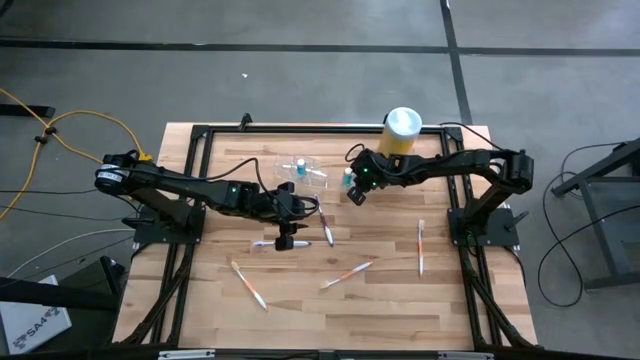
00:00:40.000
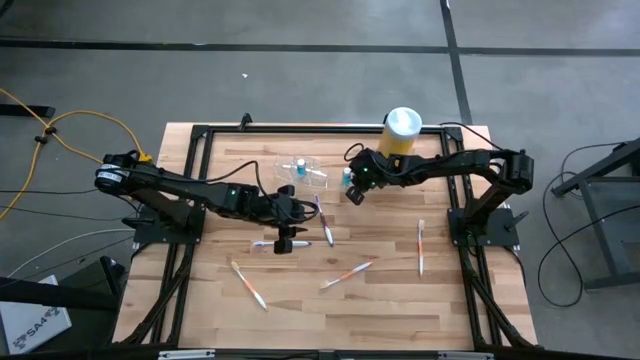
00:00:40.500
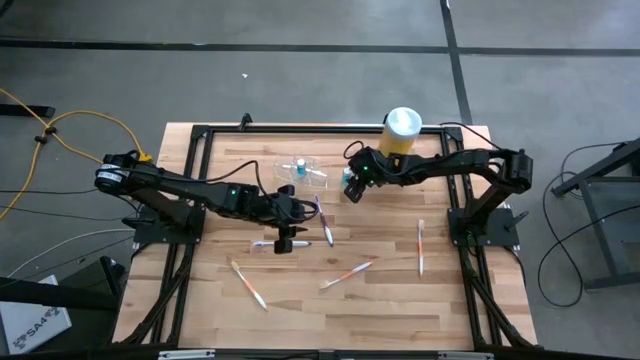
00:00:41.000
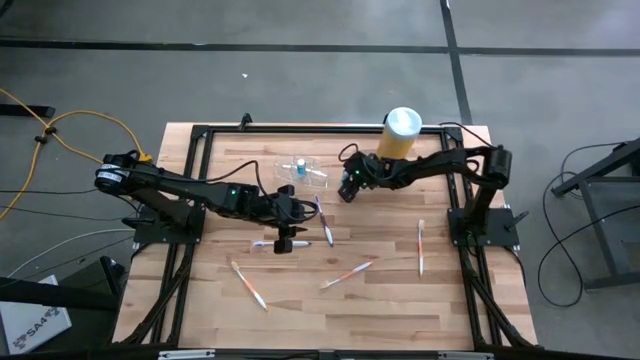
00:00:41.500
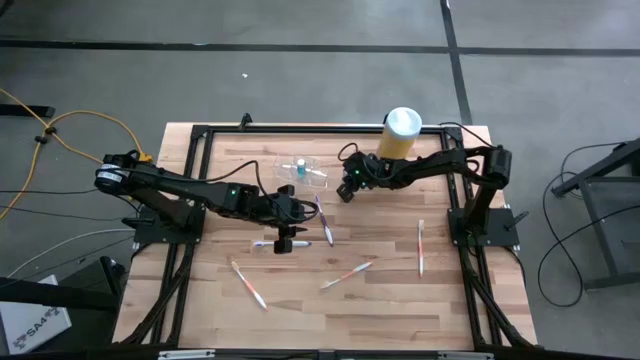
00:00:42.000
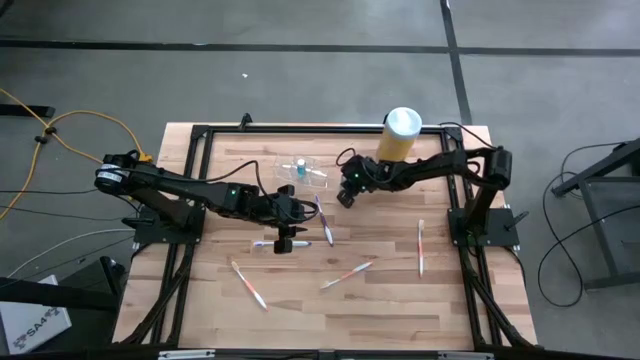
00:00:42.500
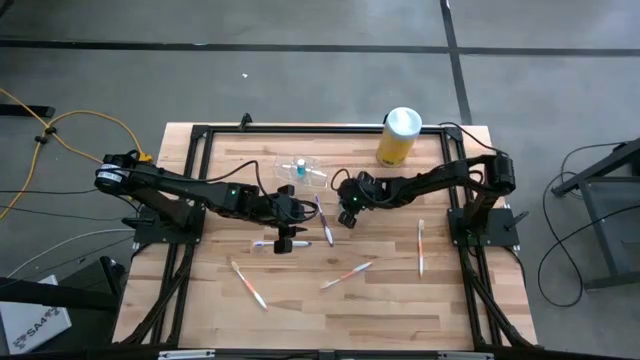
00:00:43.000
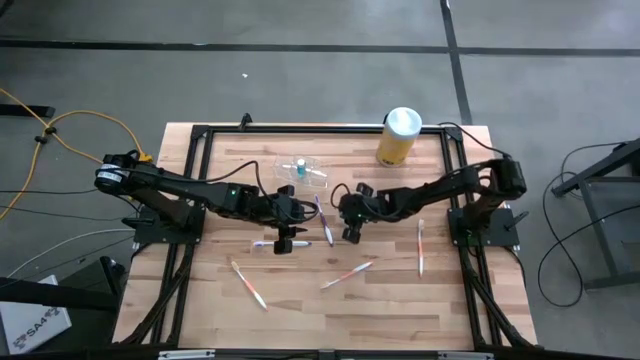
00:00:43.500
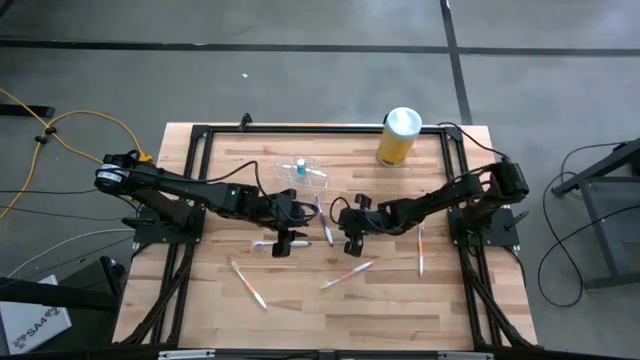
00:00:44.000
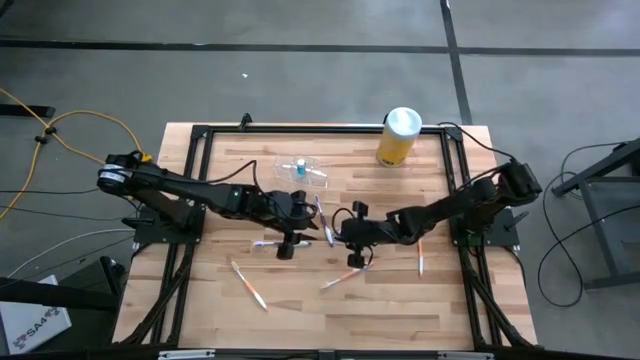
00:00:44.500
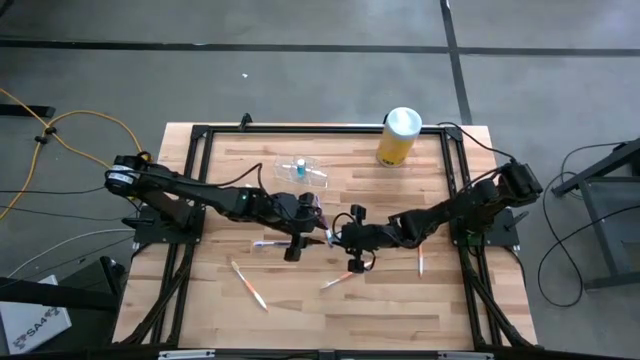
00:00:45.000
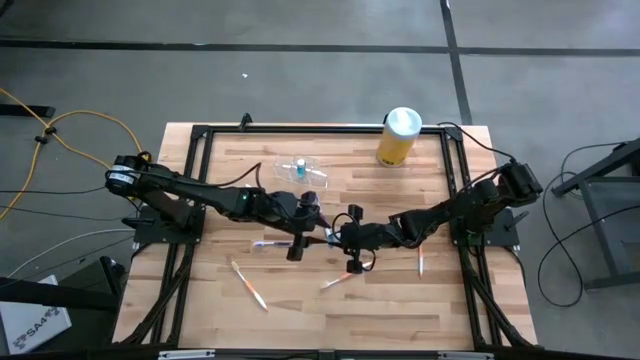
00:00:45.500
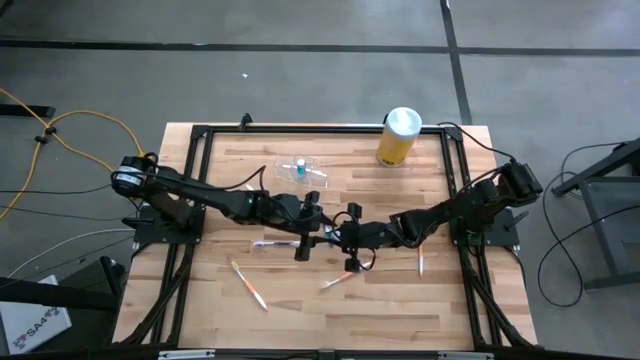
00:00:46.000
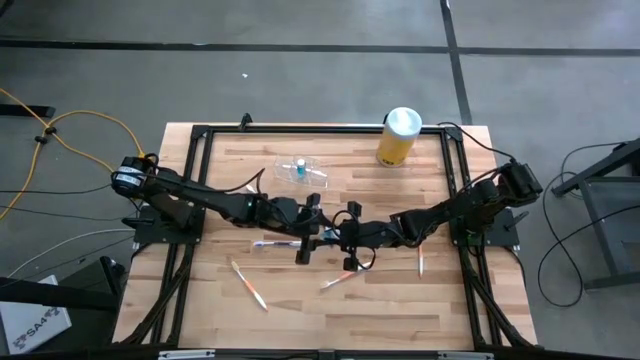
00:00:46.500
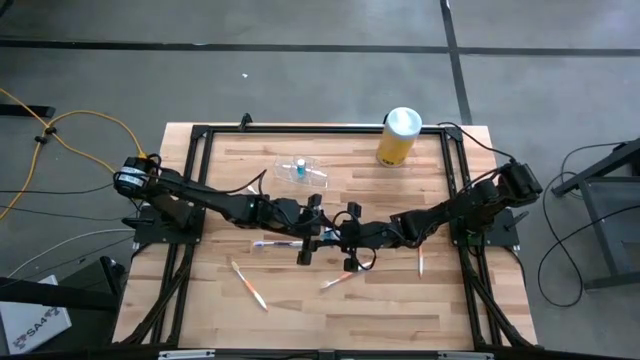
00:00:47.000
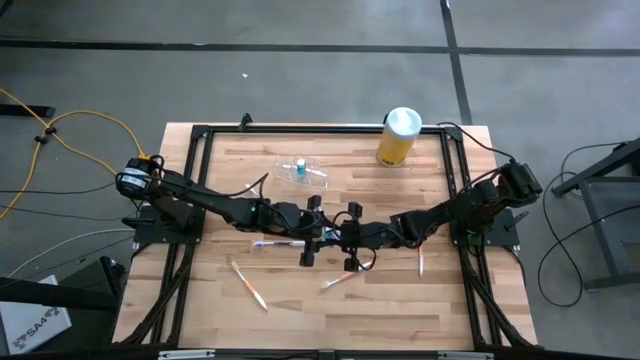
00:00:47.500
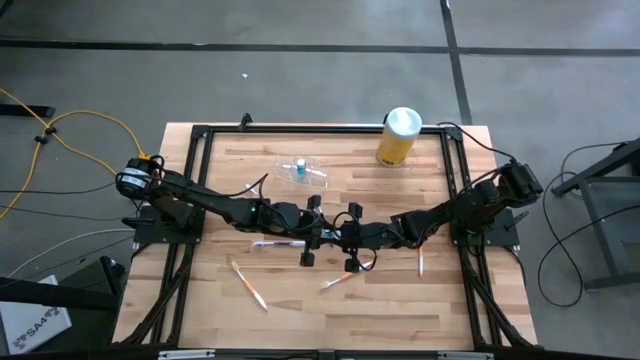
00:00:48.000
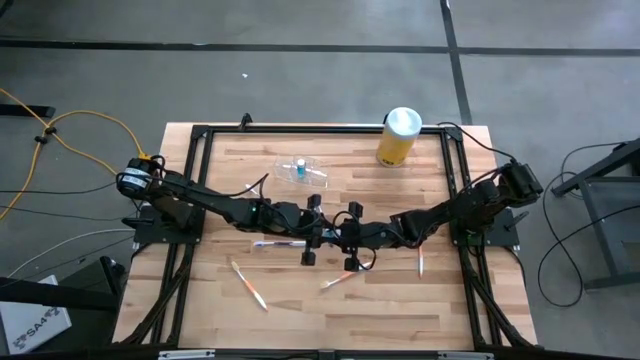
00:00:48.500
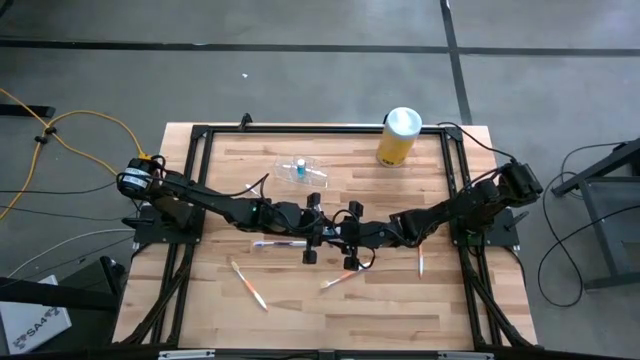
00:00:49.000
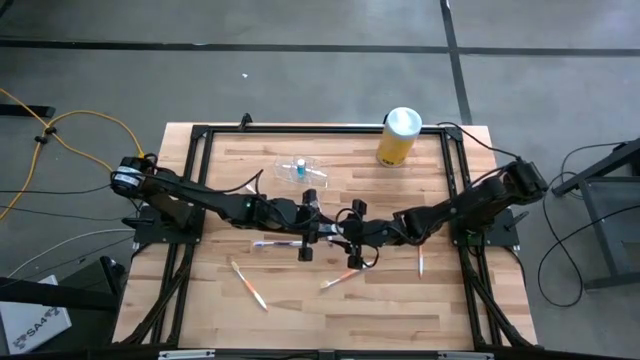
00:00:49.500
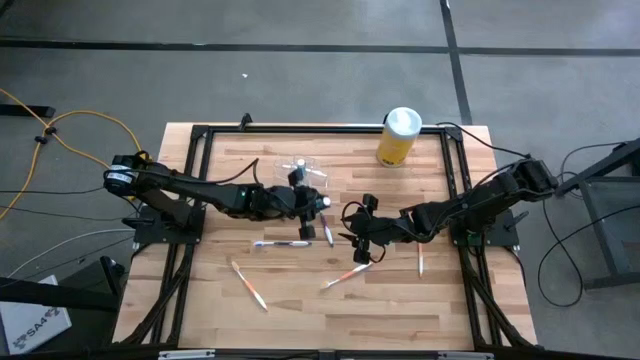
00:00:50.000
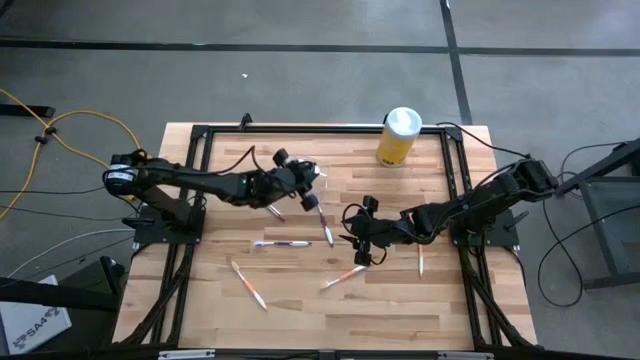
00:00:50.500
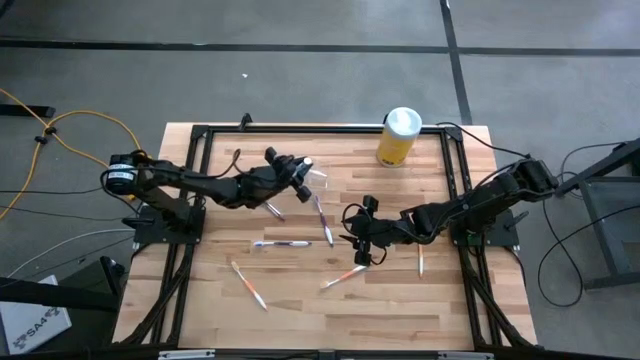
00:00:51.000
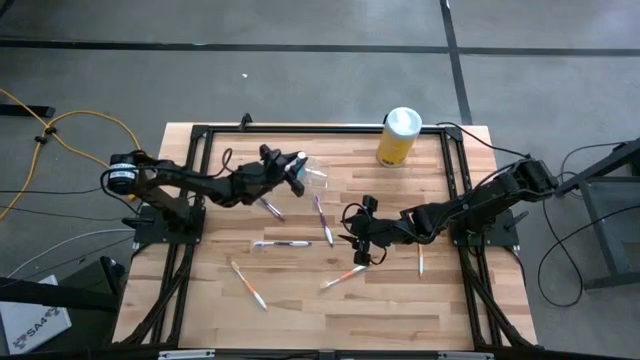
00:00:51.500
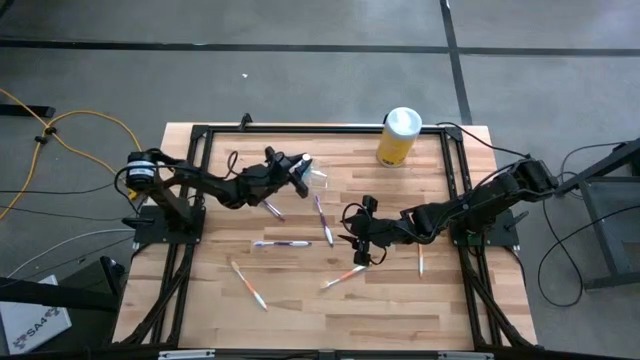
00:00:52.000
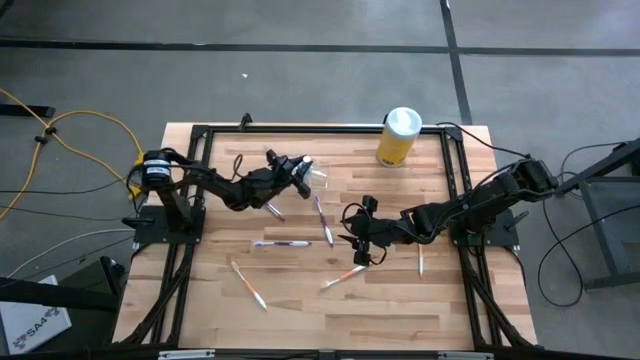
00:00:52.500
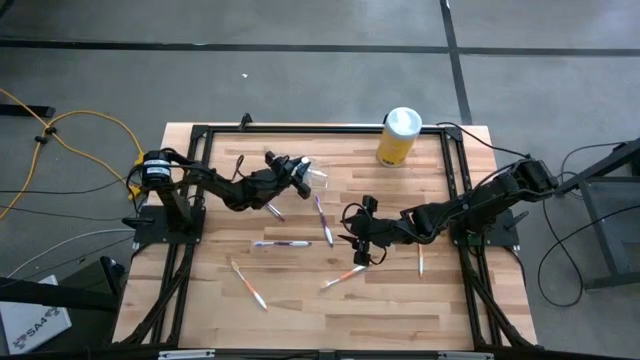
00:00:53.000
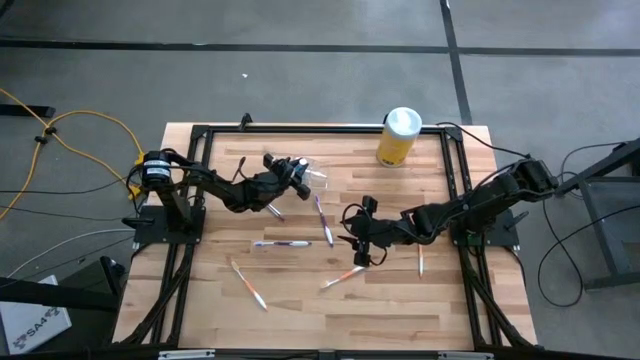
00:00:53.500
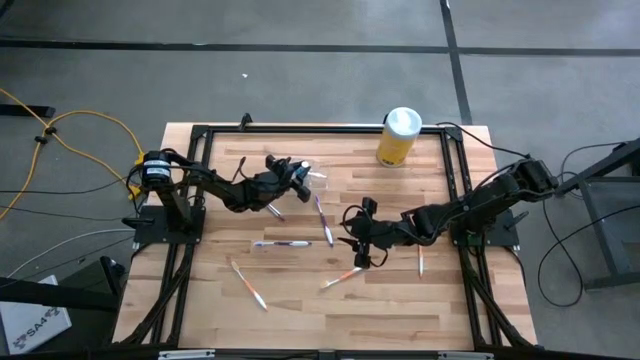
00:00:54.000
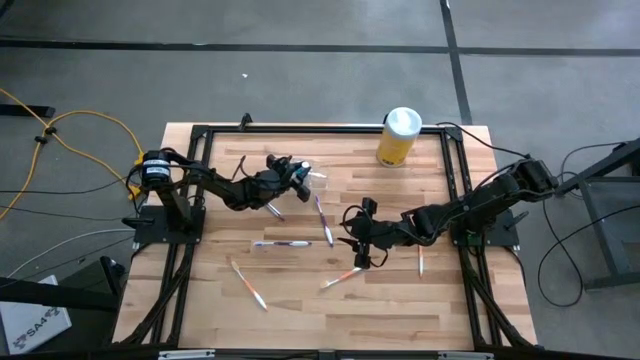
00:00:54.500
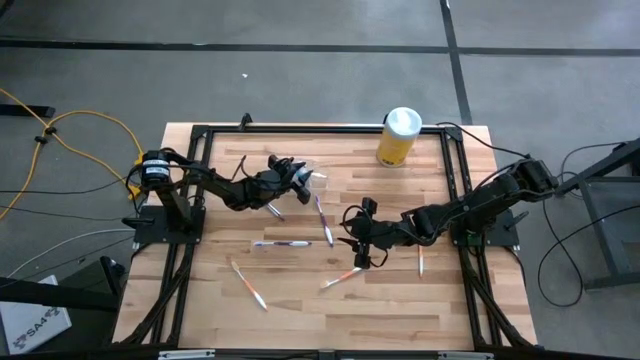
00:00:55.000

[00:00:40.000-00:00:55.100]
Task: Pick & Place toothbrushing station
Put the blue mouthwash into the transparent organizer

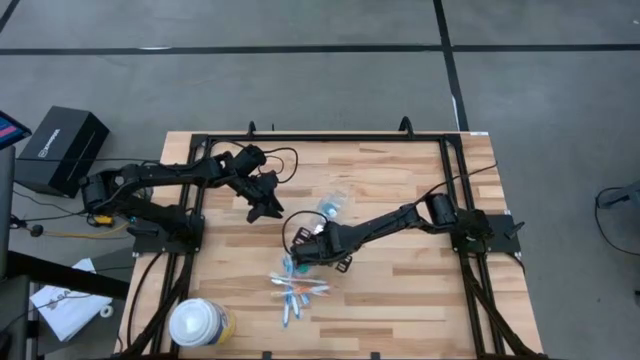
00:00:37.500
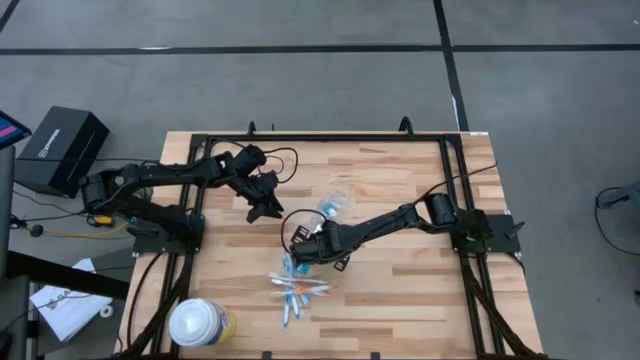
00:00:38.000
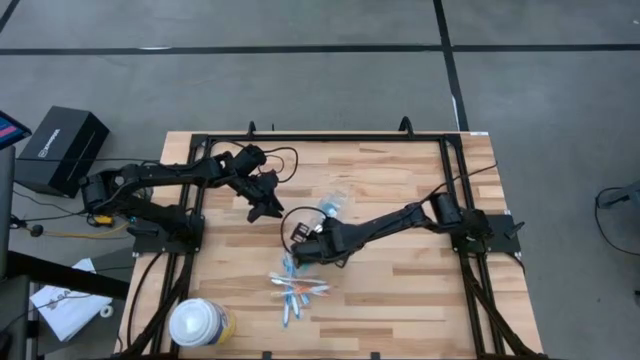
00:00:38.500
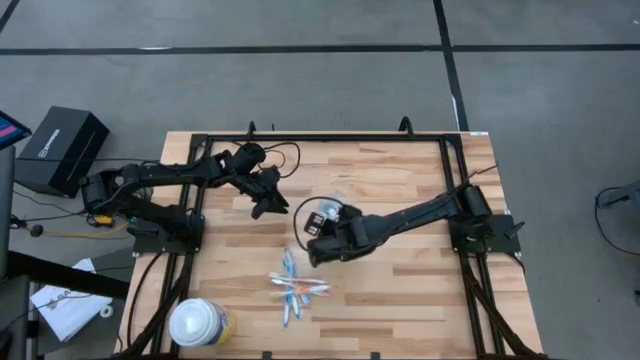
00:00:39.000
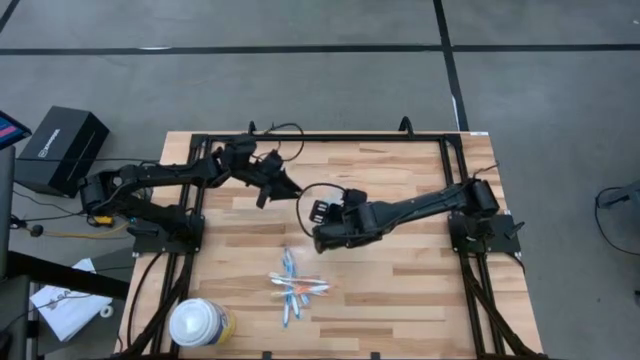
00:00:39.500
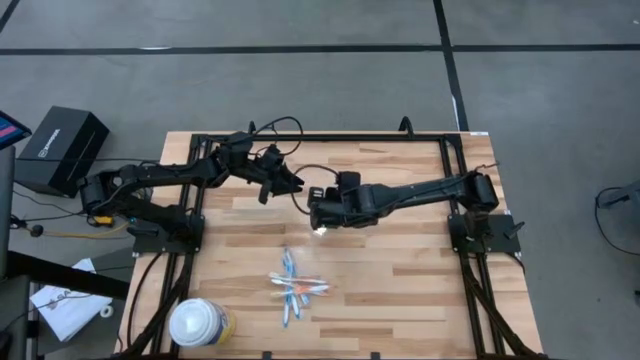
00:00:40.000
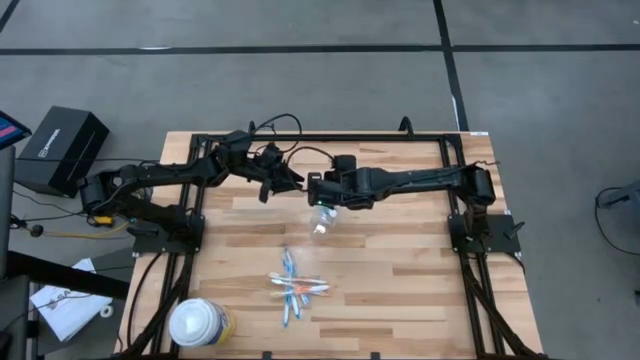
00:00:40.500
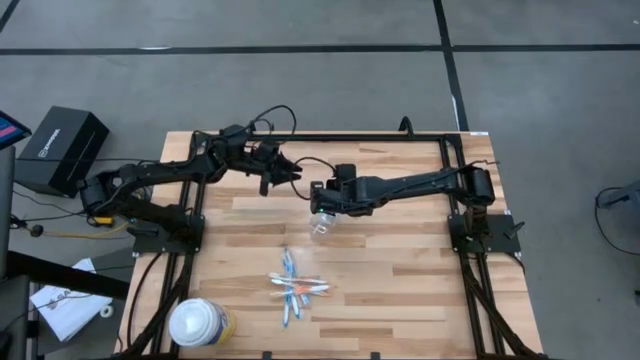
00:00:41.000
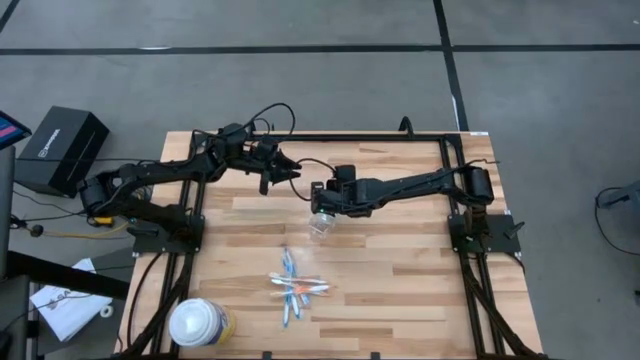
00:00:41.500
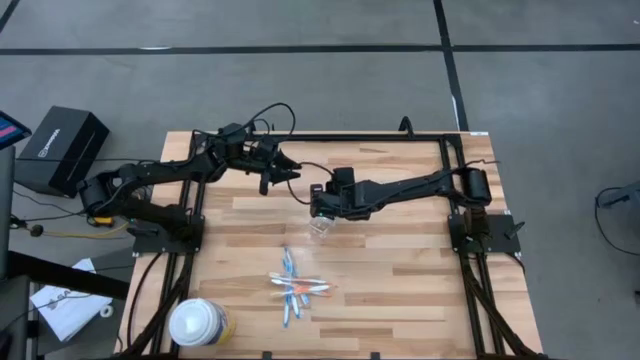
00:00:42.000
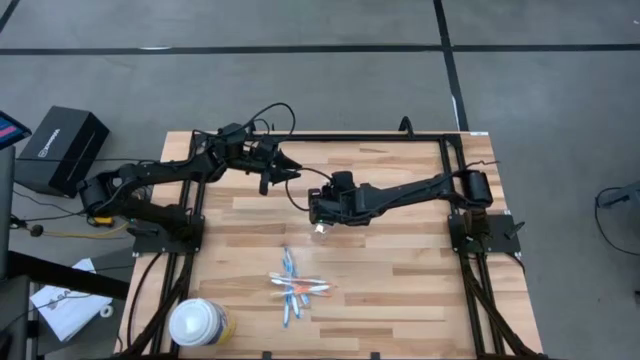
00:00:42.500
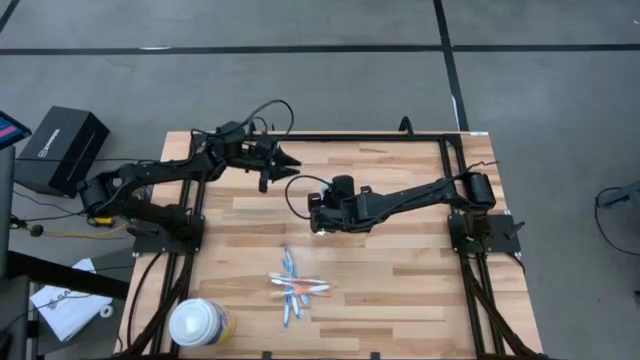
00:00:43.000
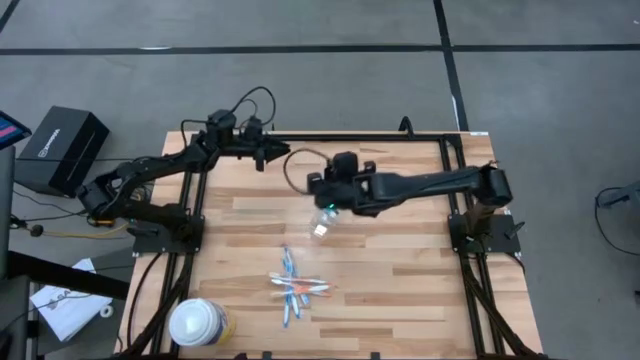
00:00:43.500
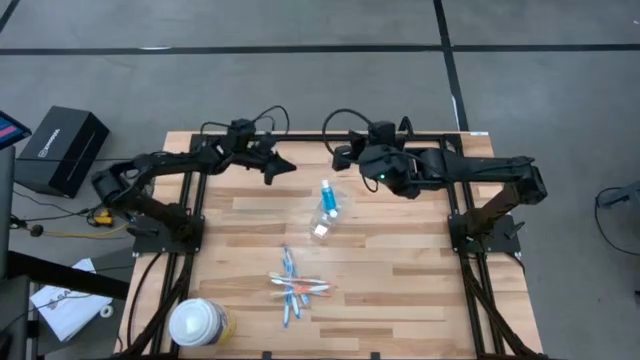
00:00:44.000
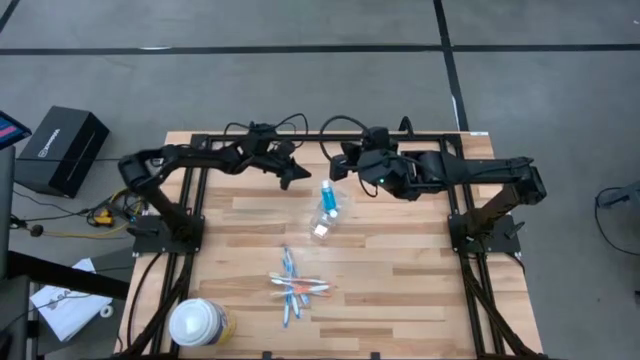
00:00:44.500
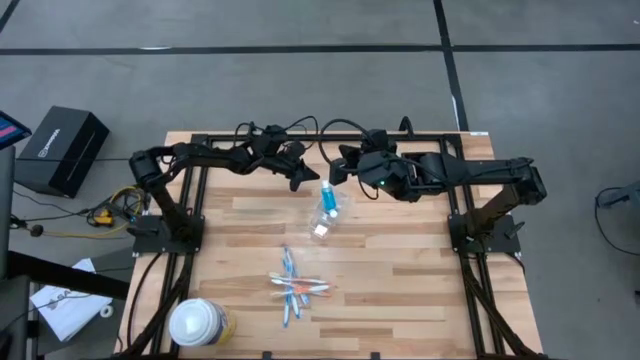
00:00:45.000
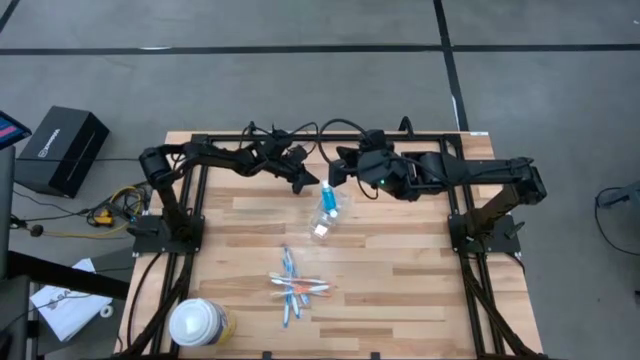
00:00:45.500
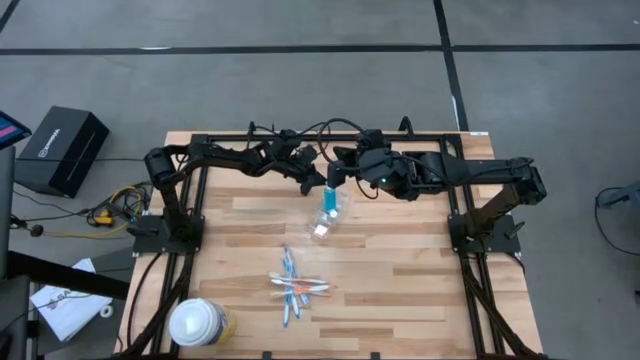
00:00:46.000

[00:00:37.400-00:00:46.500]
Task: Pick & Place toothbrushing station
Put the mouthwash into the middle section of the transparent organizer
